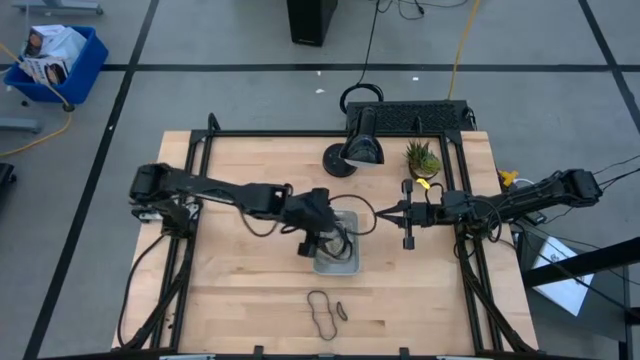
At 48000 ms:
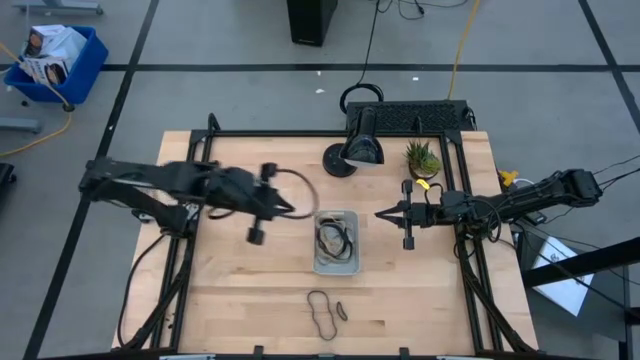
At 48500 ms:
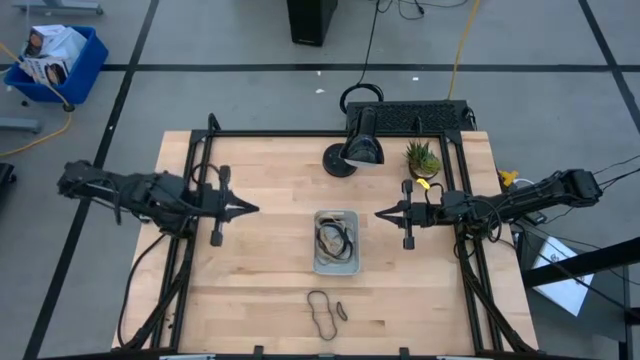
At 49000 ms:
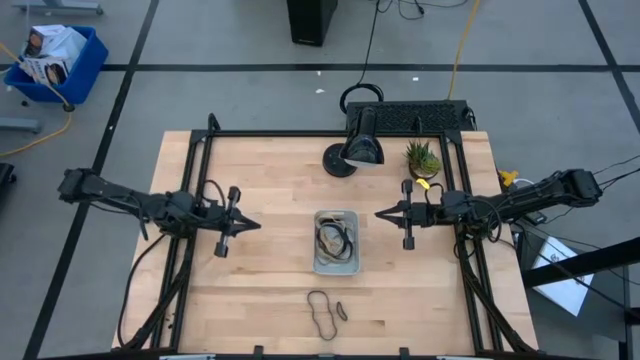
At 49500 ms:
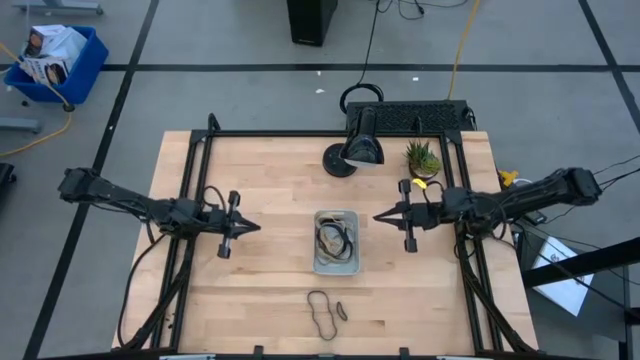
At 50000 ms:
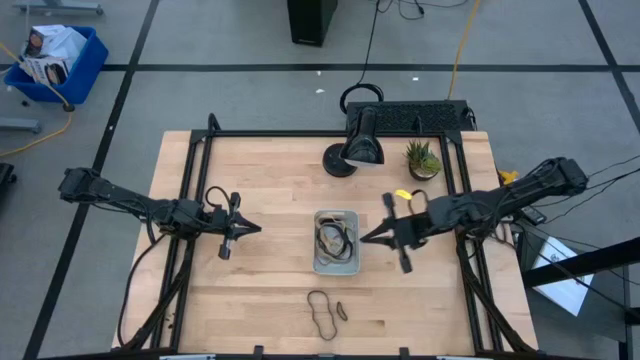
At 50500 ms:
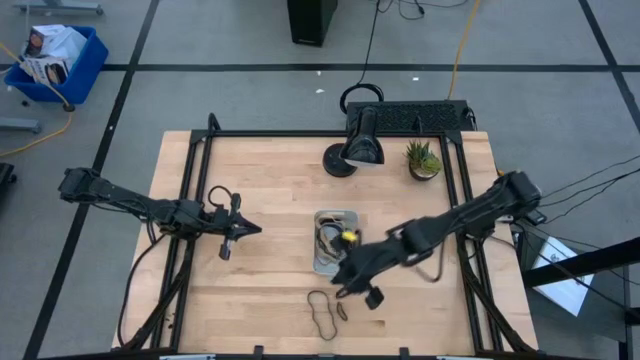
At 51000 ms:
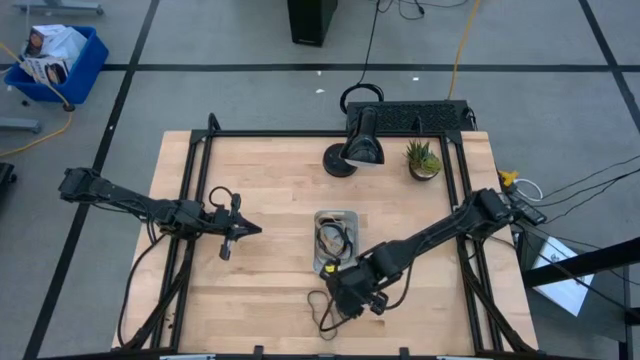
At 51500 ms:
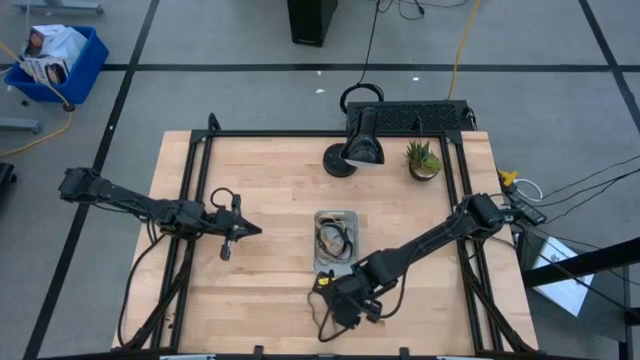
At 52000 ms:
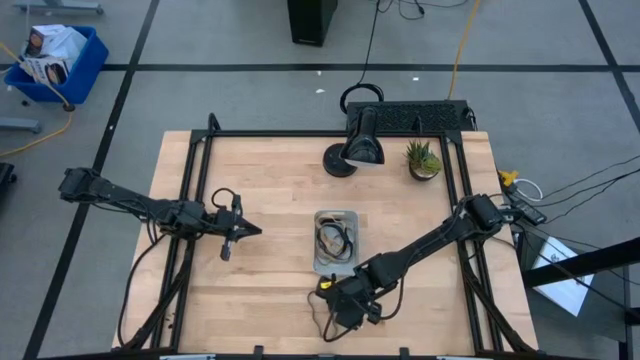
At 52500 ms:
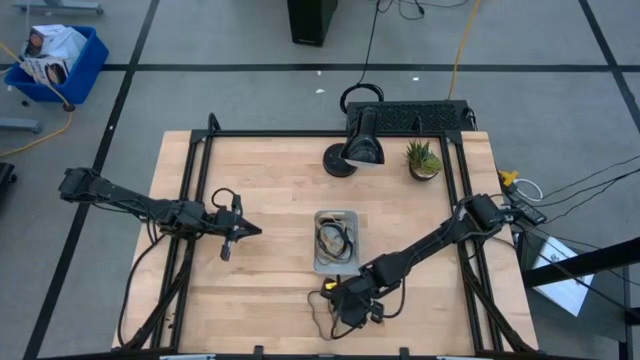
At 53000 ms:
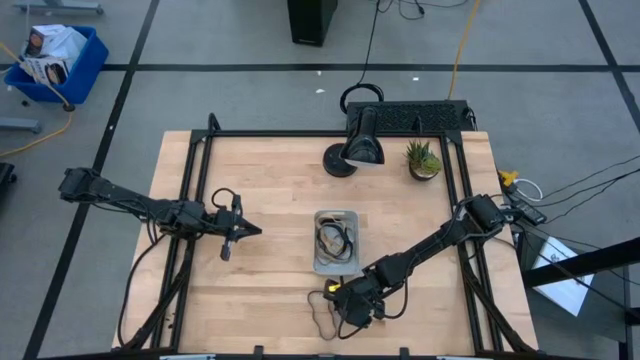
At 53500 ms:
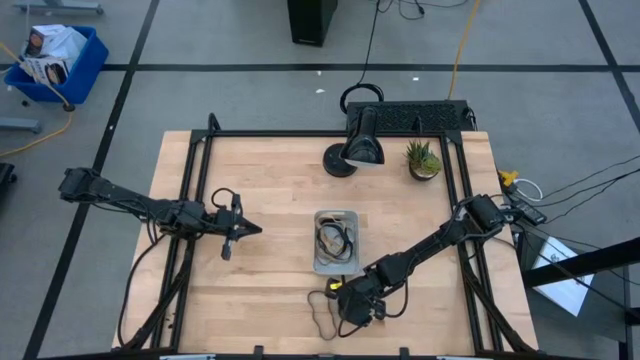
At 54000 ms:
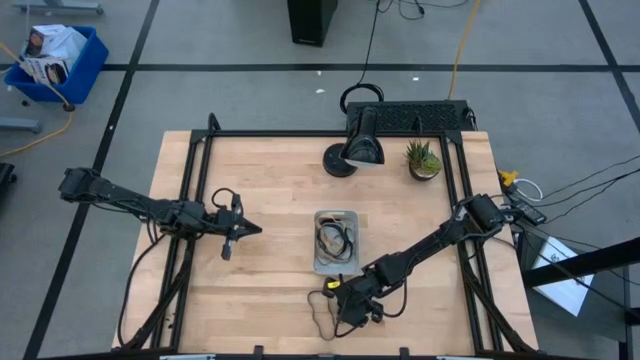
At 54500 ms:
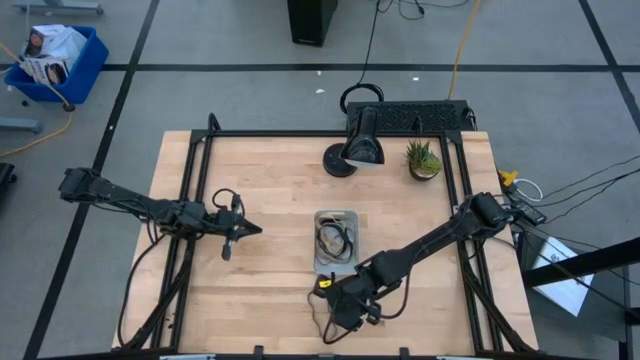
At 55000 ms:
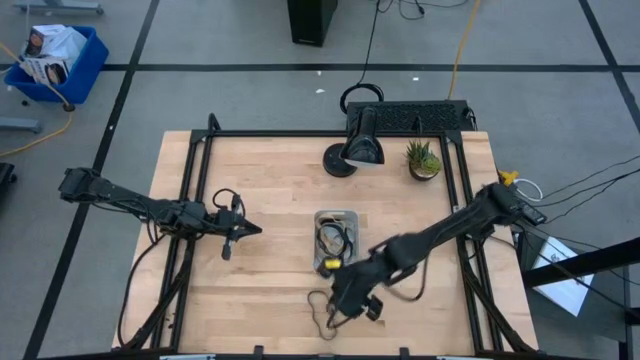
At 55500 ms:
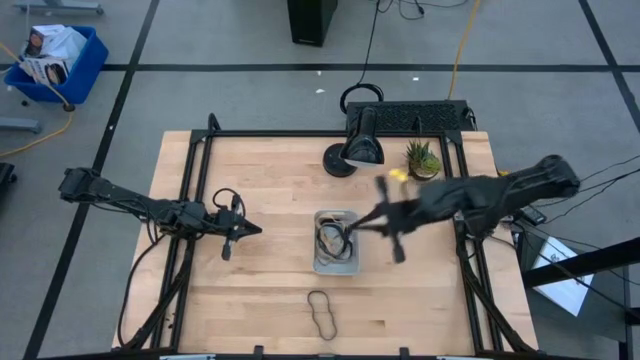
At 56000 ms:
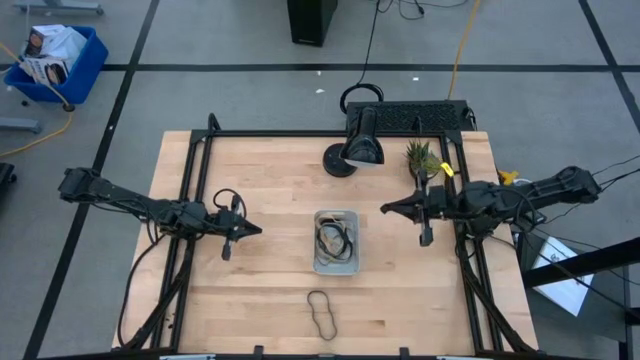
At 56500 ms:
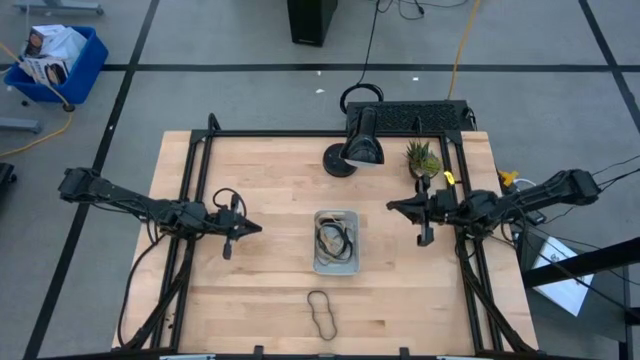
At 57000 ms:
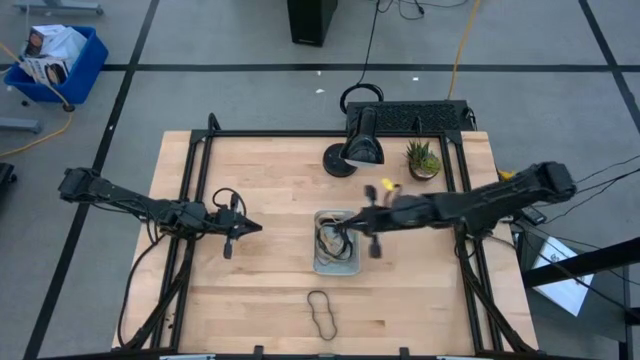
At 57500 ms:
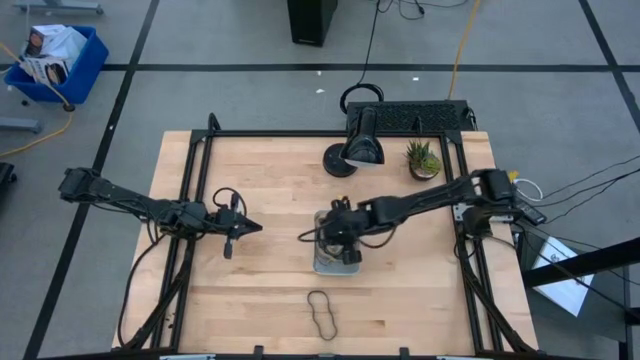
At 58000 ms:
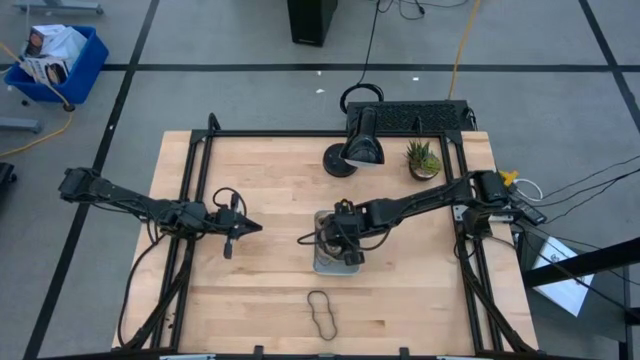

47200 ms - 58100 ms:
Task: Pick and place rubber bands into bin
Put the black rubber band into the gray container

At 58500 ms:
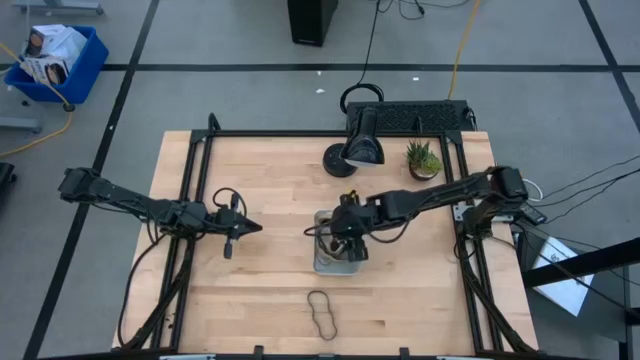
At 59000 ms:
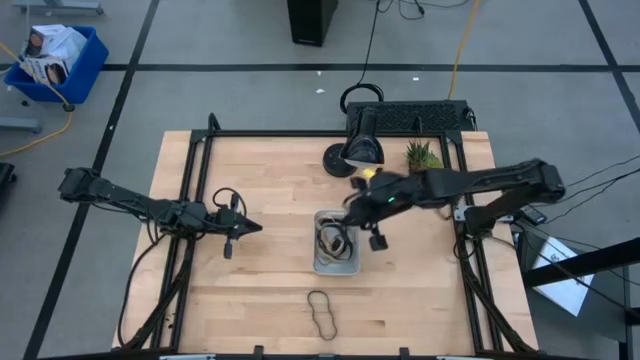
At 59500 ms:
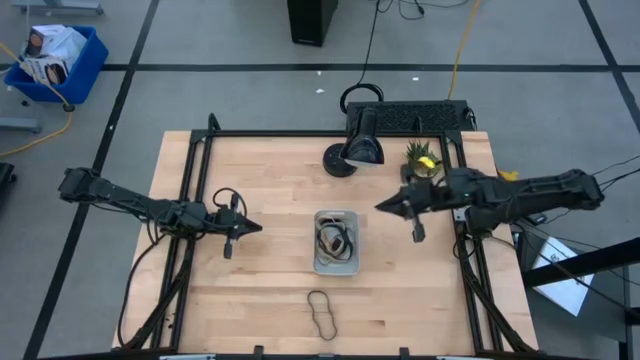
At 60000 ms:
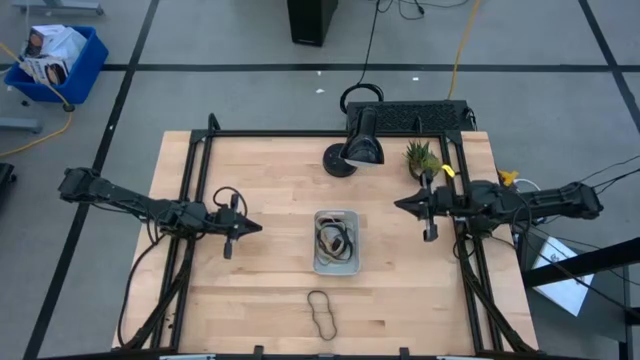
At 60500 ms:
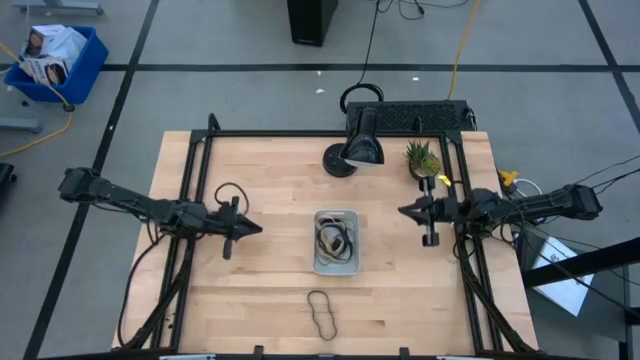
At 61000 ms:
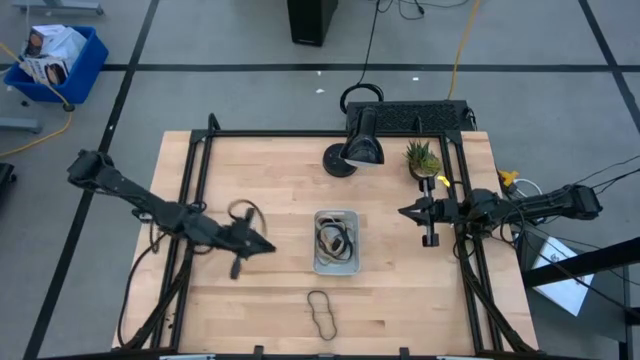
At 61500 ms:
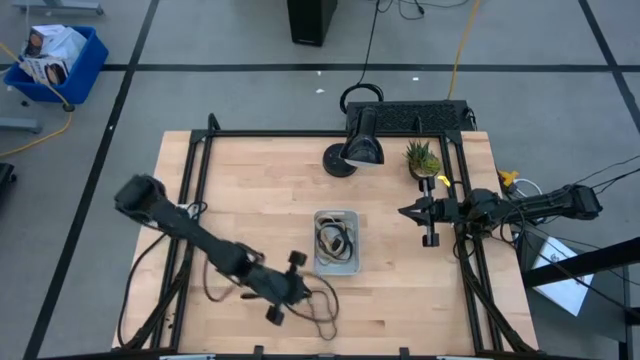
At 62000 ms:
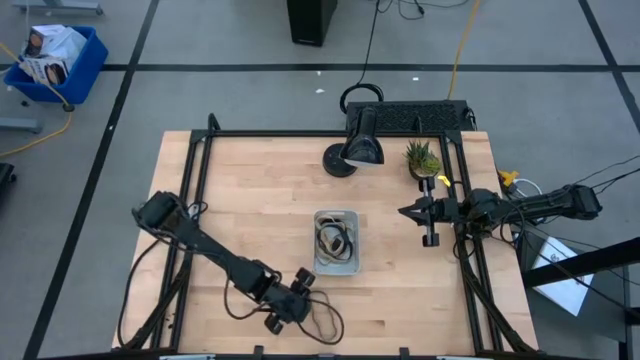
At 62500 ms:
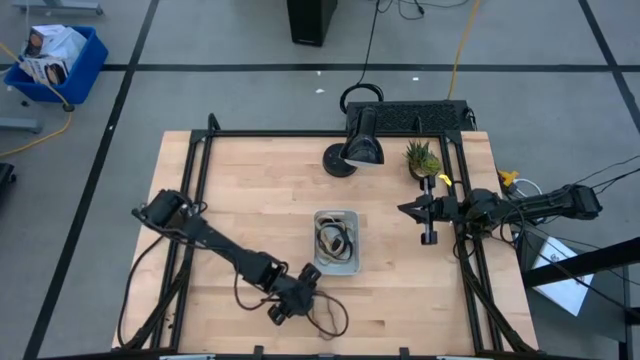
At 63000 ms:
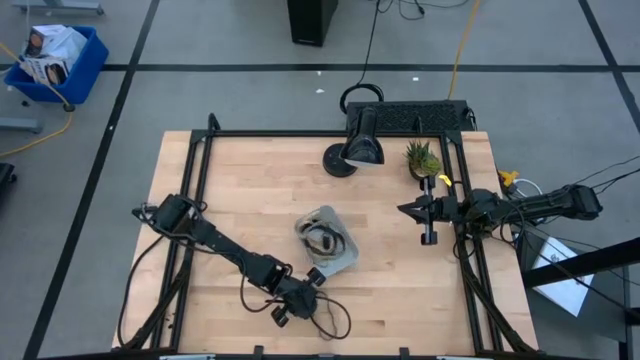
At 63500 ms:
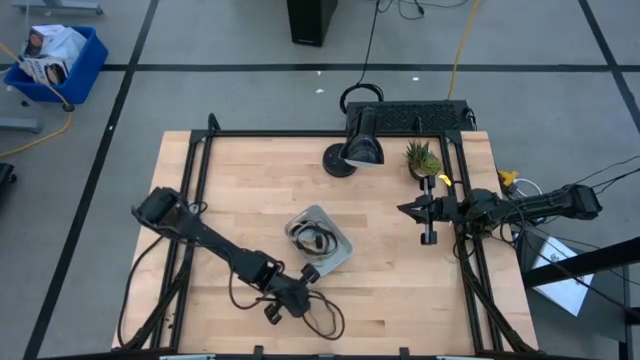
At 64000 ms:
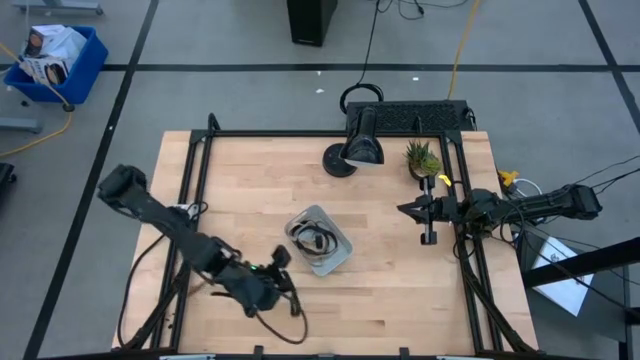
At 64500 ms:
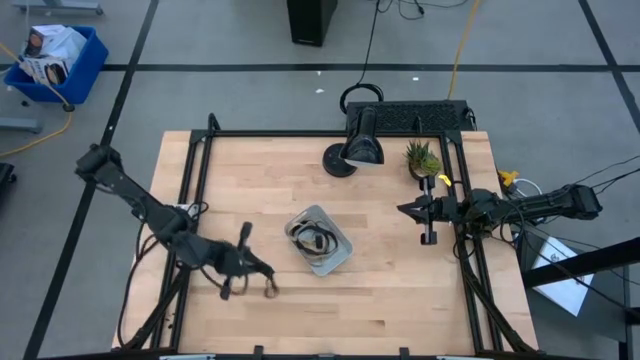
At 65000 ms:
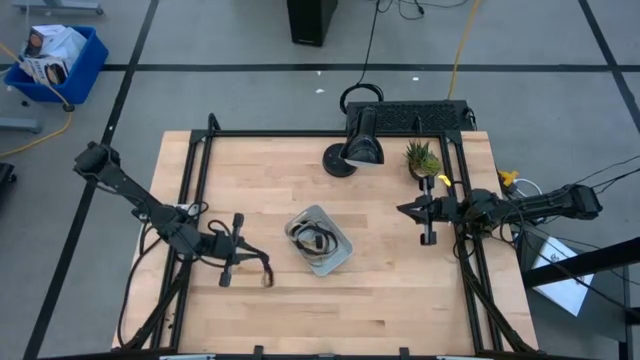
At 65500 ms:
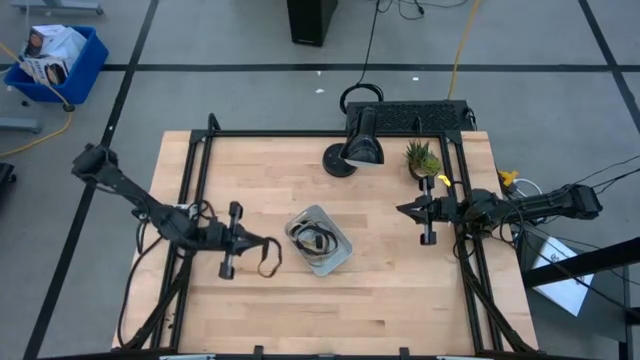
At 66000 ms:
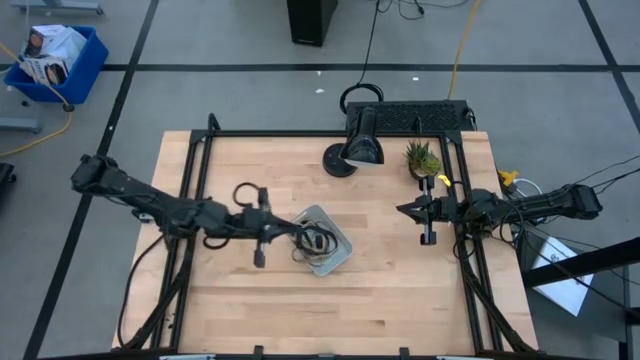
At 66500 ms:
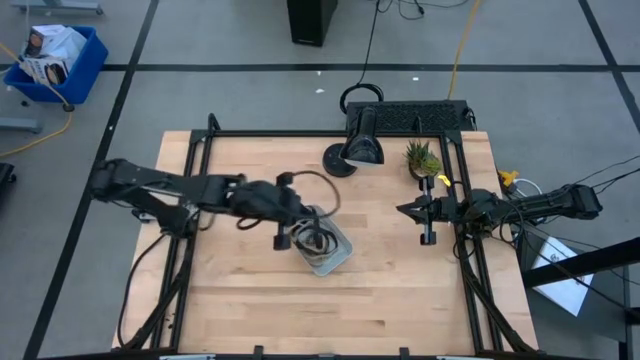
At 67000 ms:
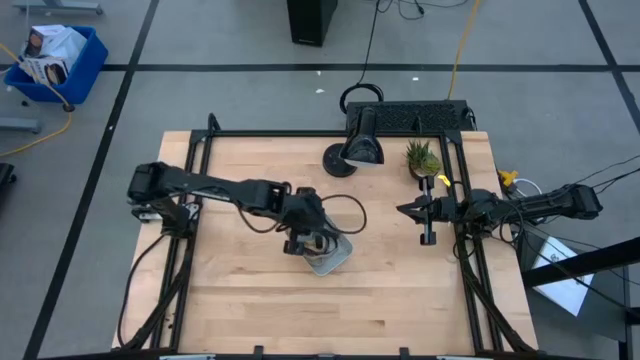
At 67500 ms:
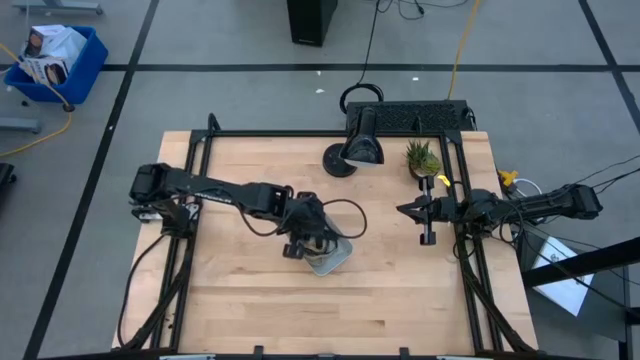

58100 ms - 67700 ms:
Put the black rubber band into the gray container

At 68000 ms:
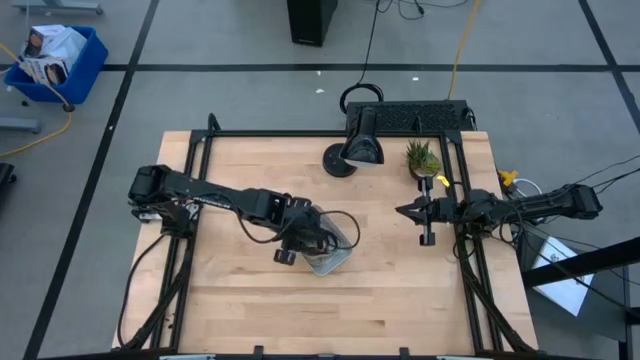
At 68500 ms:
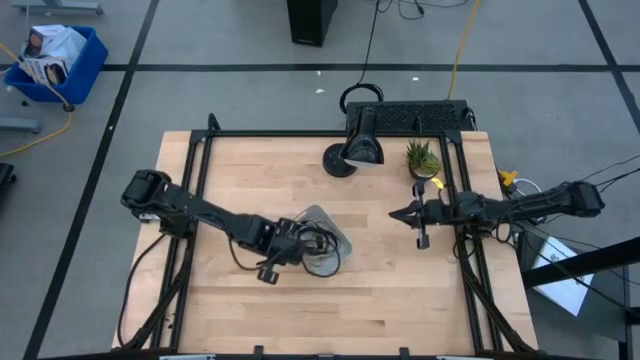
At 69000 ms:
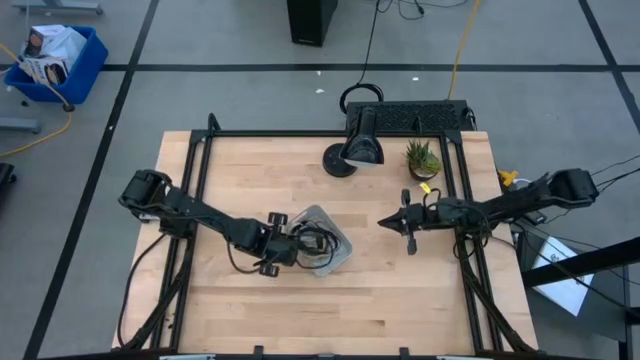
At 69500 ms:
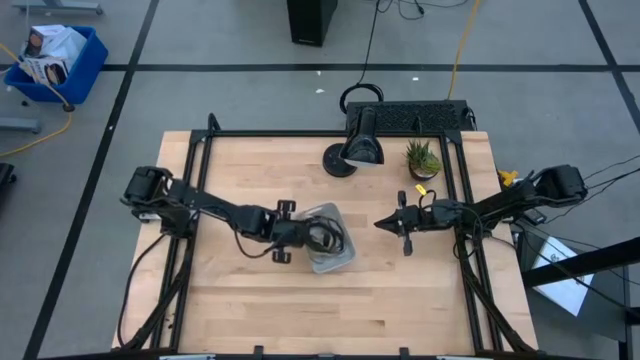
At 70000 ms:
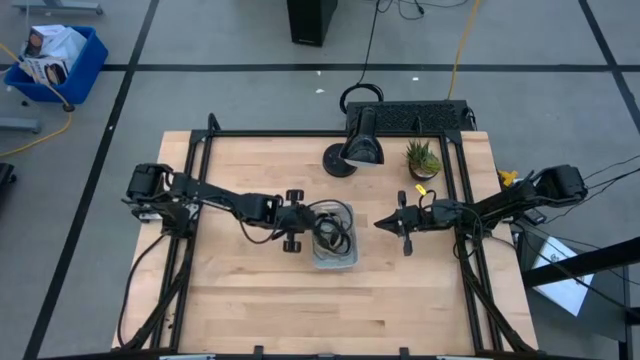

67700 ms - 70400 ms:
Adjust the gray container
